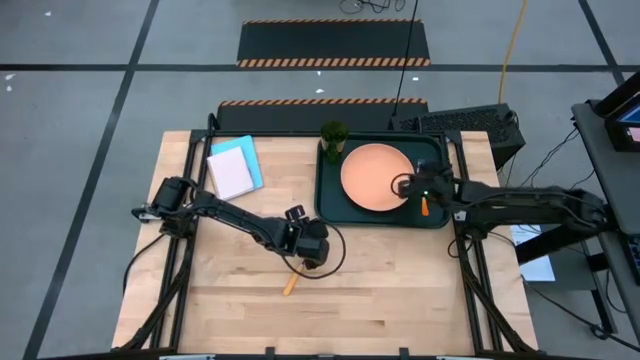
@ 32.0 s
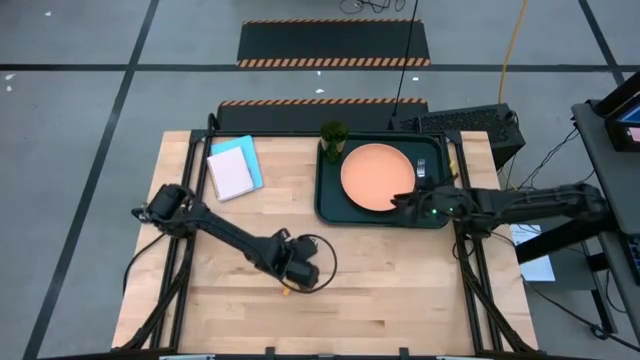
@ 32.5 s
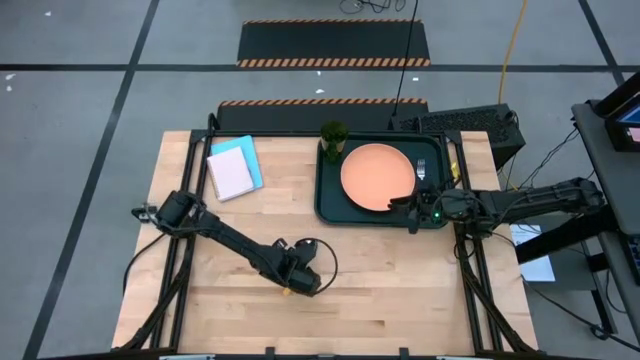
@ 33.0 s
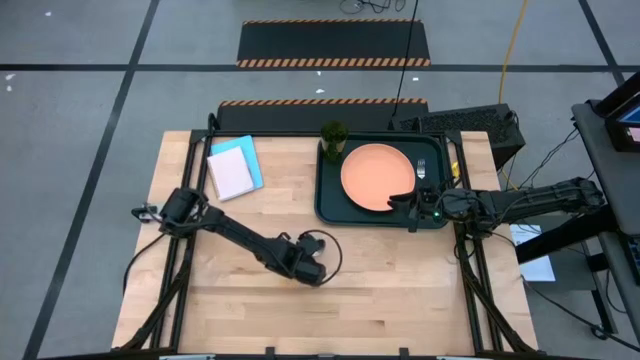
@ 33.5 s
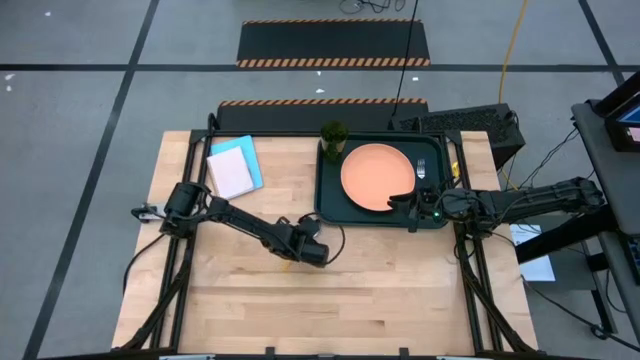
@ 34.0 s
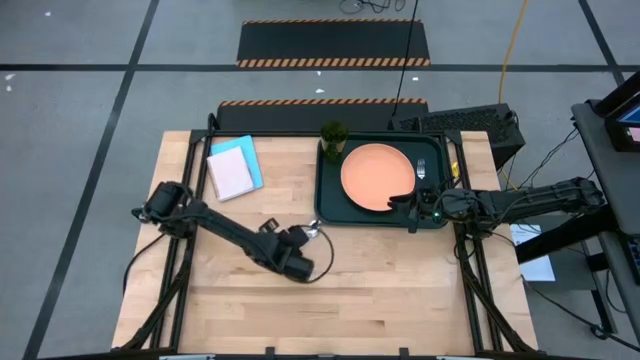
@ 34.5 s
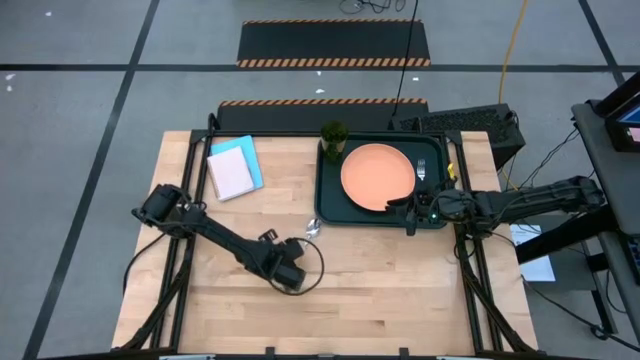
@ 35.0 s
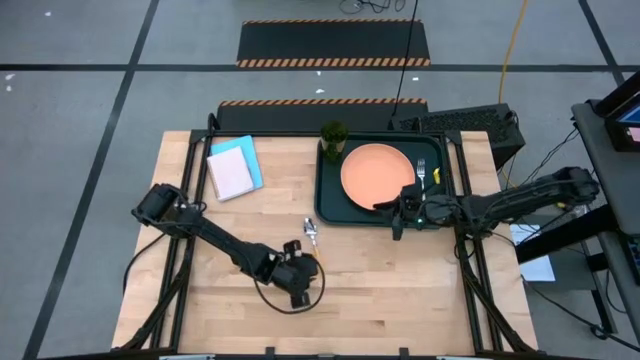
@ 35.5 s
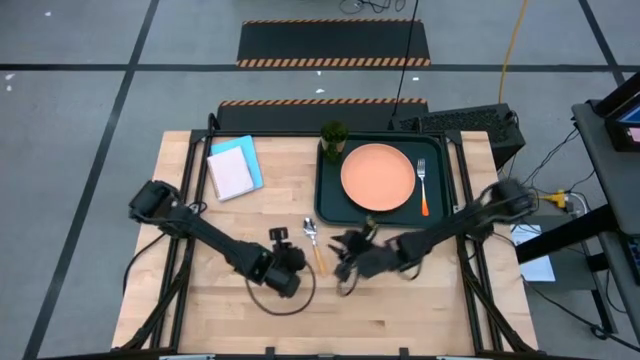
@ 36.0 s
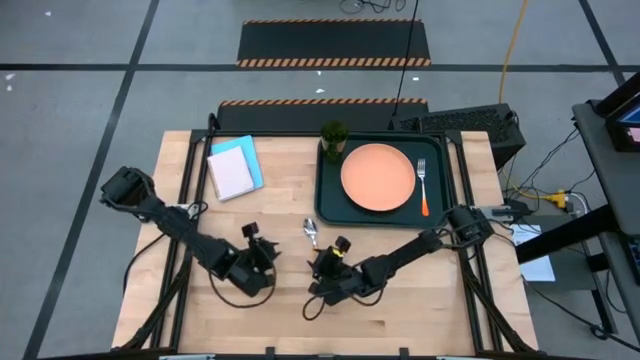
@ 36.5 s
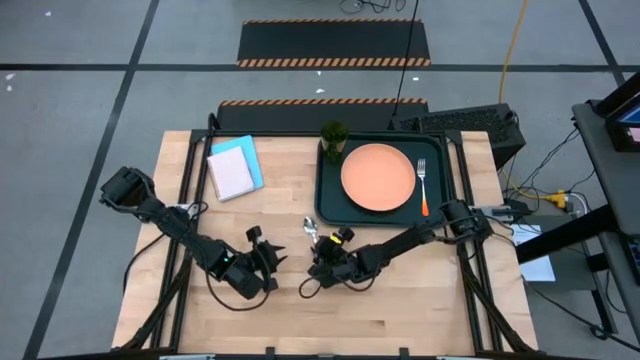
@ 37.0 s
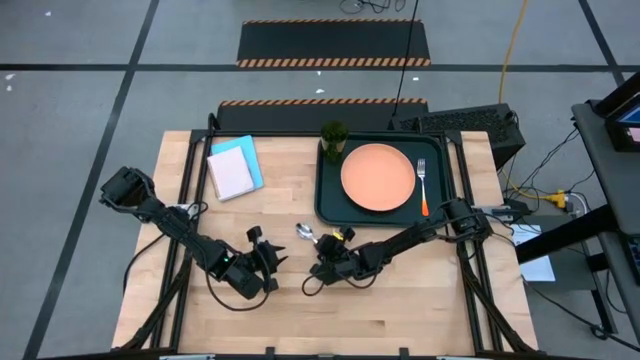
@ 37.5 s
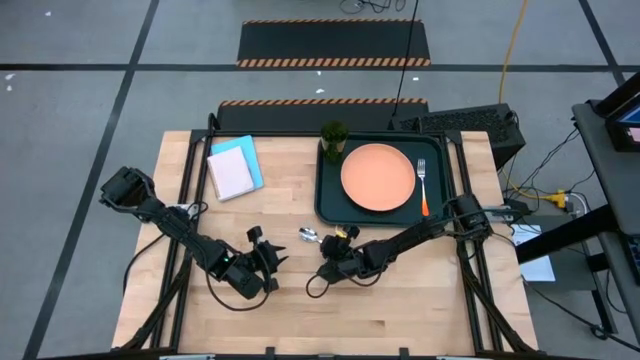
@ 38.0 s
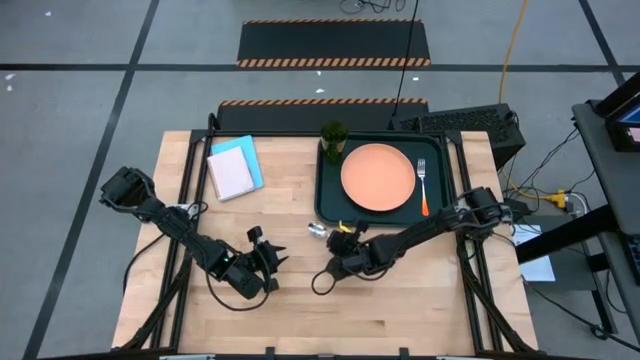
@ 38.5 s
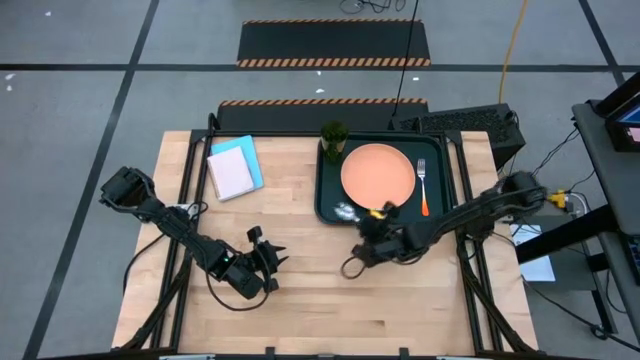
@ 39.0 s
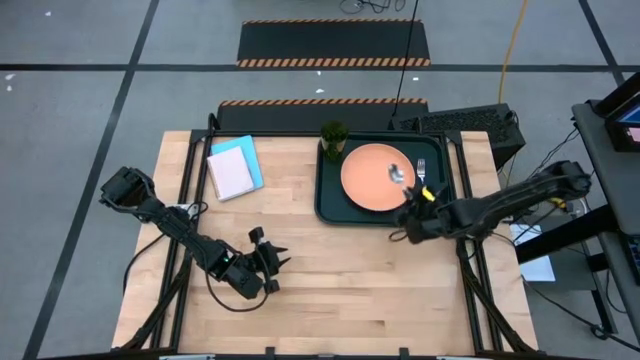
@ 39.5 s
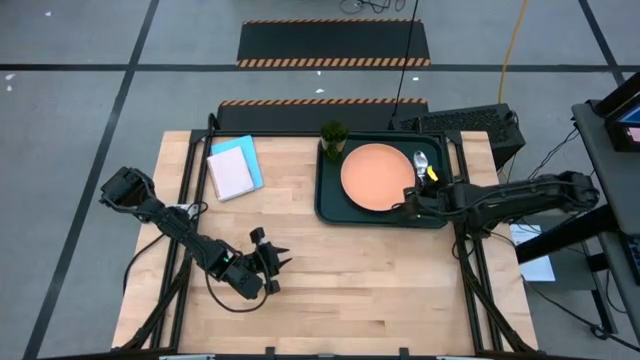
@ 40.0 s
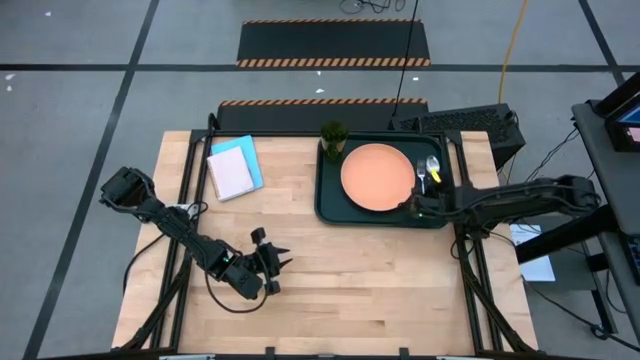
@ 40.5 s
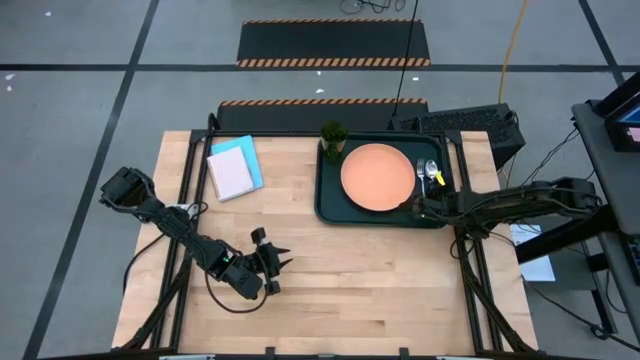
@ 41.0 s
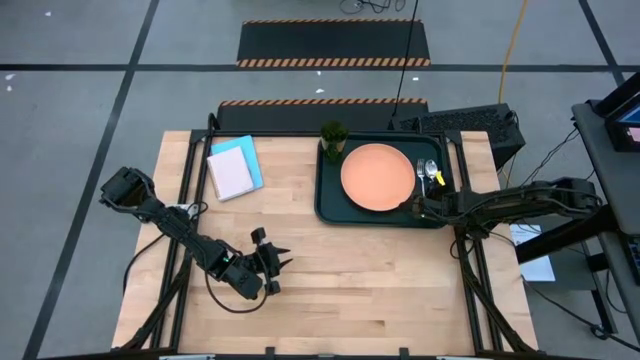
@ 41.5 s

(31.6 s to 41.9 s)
Task: Pick and place plate/cup/fork/spoon on tray
Put the yellow spoon to the right of the orange fork on the black tray

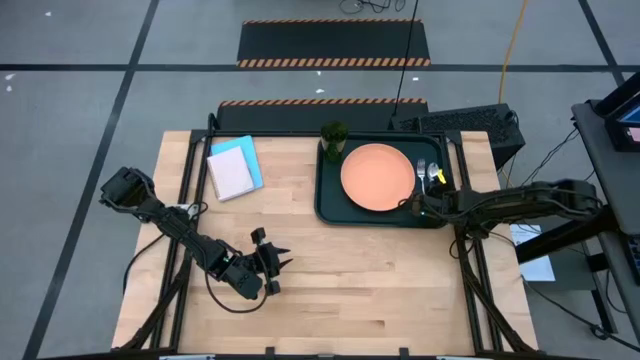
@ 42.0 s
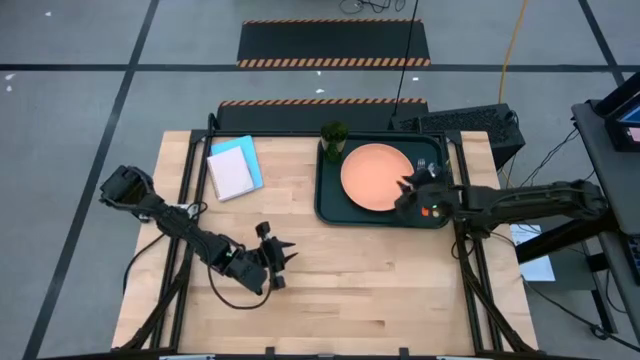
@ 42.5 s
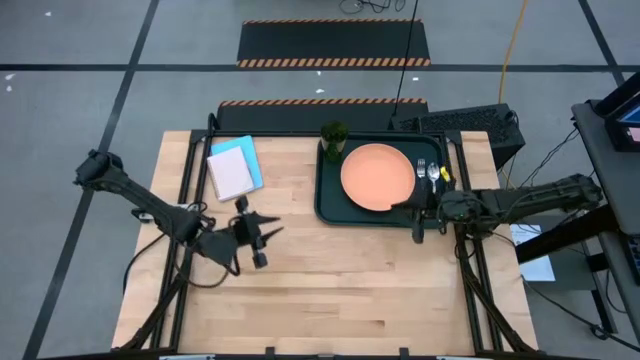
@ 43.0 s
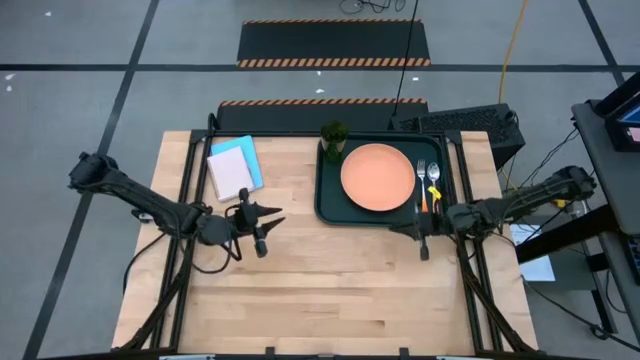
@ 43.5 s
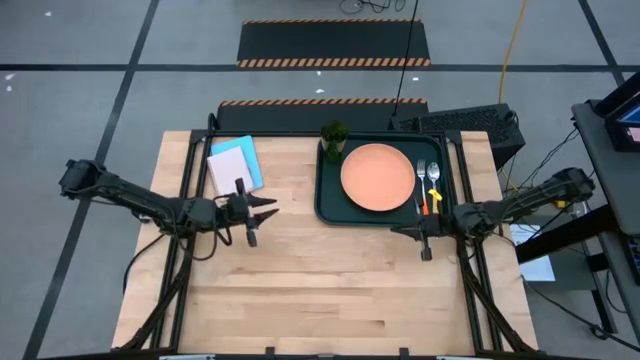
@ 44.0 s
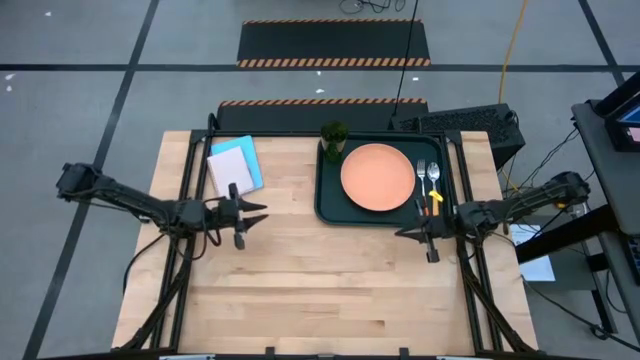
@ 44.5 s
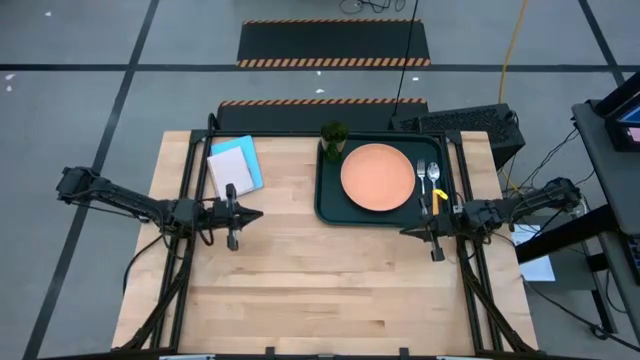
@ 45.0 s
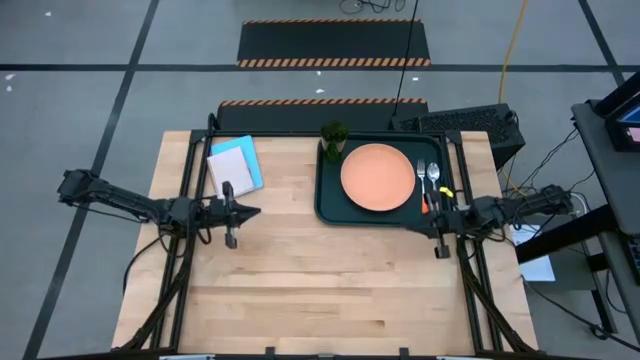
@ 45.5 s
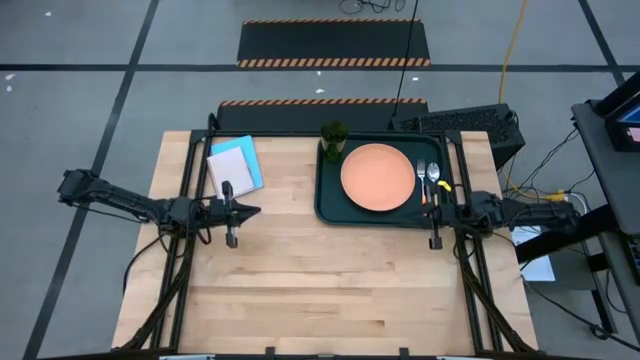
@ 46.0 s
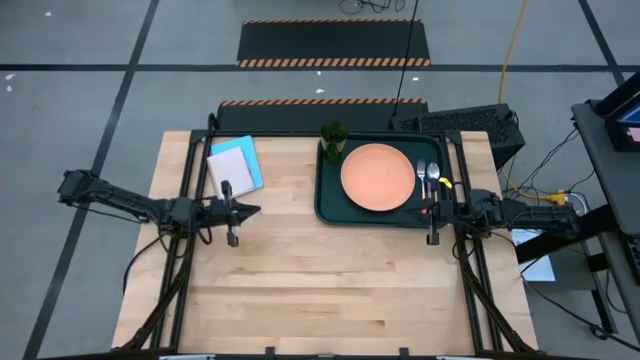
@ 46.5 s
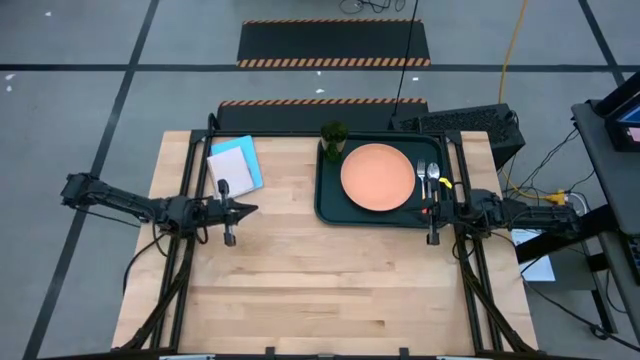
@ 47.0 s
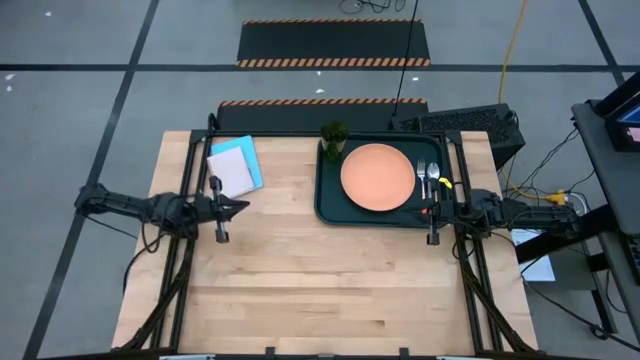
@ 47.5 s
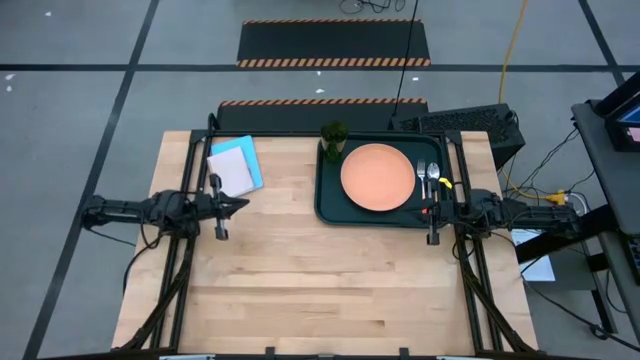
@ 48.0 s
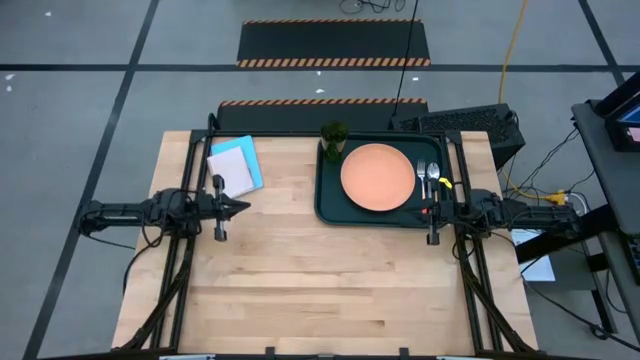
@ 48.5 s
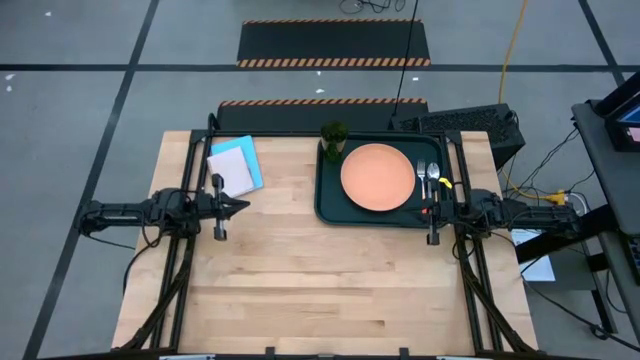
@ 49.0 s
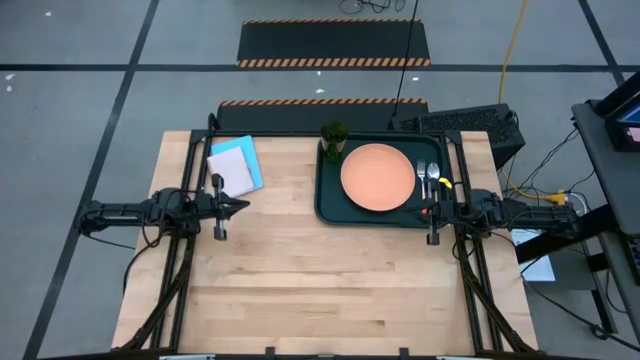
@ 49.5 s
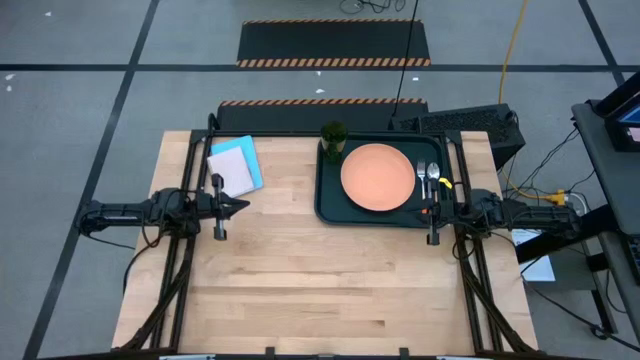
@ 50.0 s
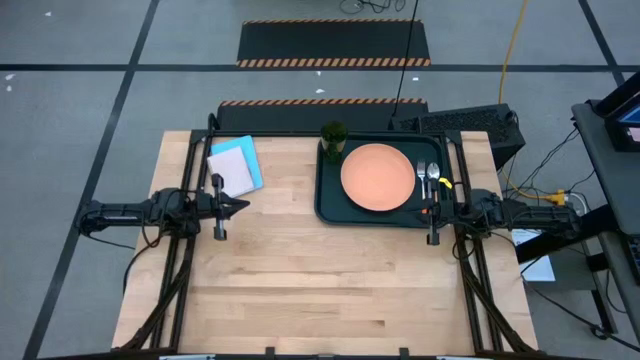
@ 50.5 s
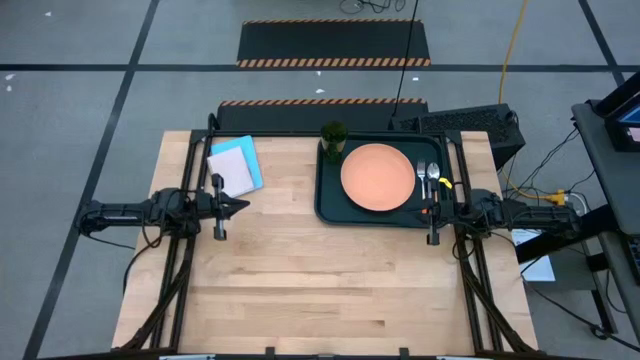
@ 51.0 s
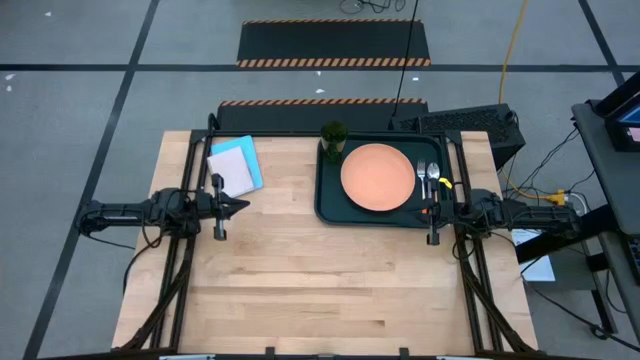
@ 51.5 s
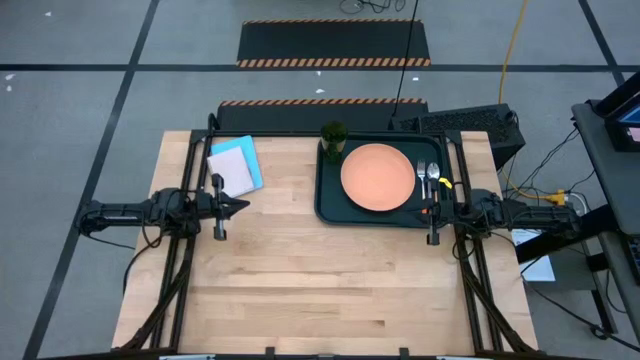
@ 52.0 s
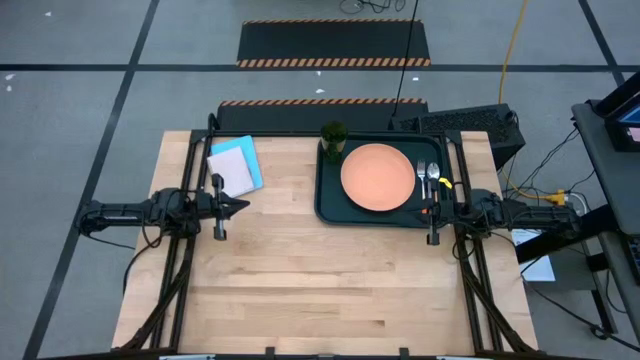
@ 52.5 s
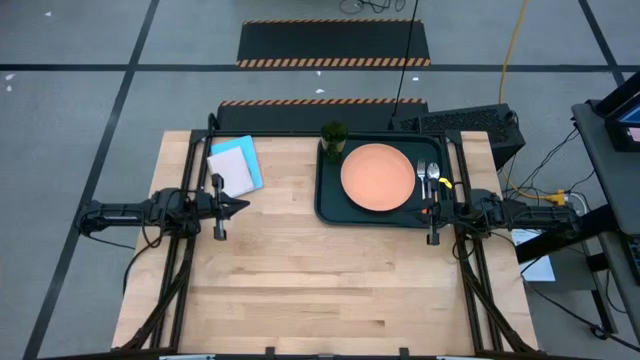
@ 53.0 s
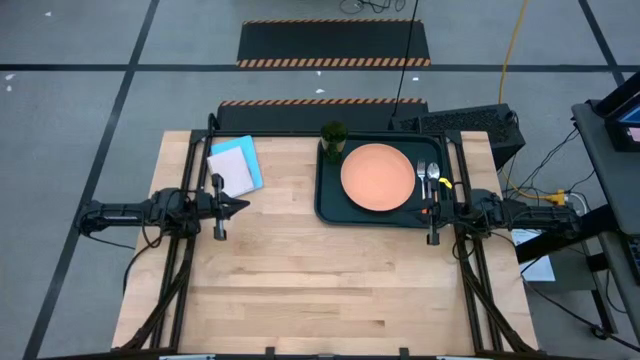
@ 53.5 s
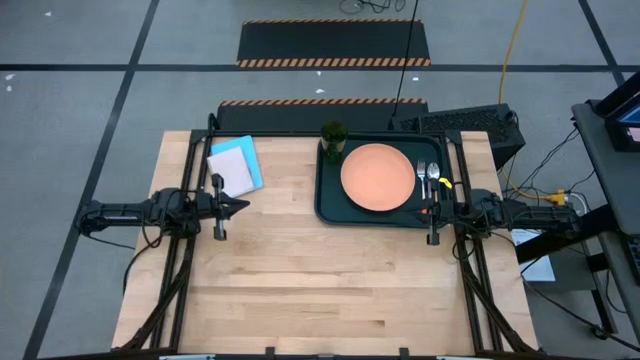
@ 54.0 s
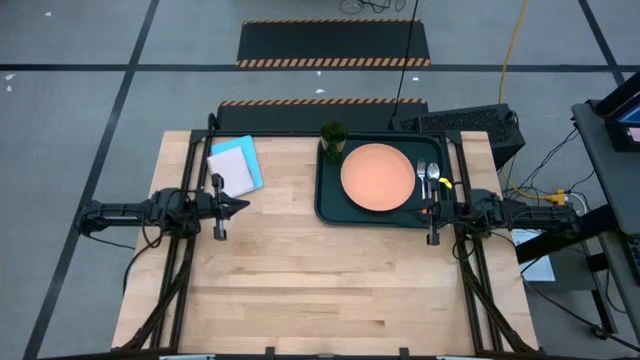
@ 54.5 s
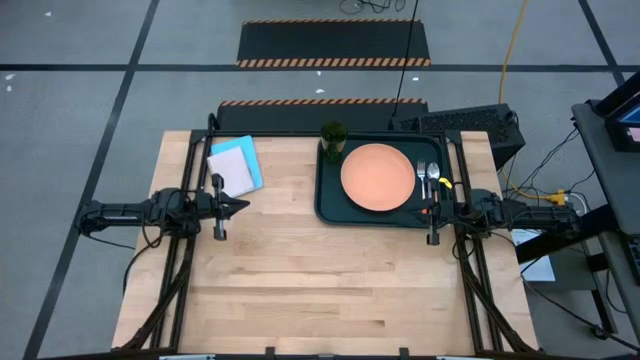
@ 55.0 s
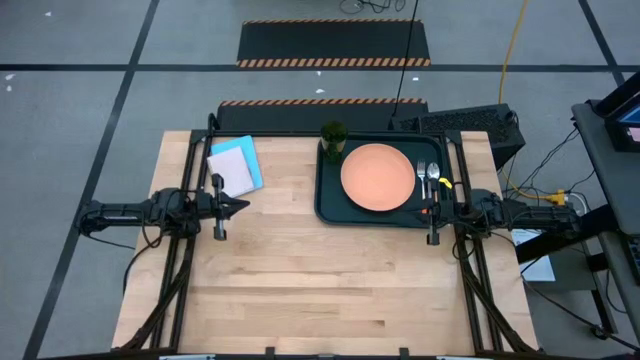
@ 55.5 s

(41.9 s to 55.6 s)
Return to home position
